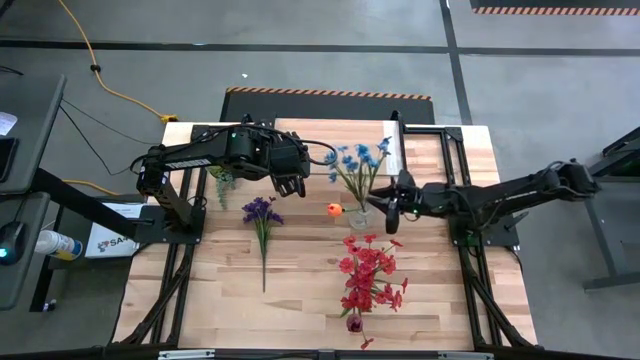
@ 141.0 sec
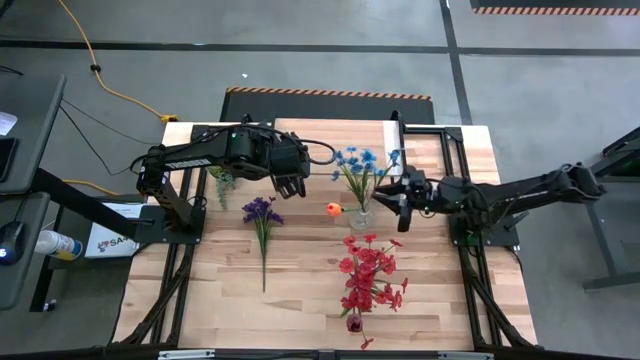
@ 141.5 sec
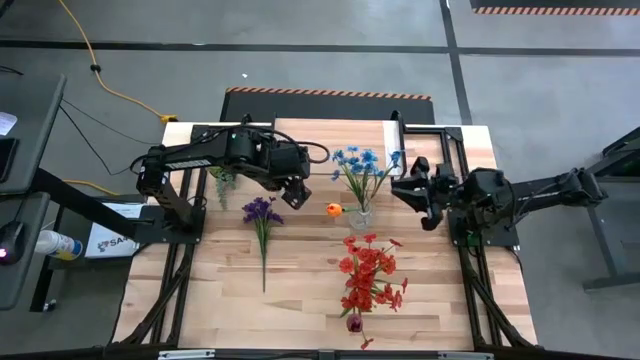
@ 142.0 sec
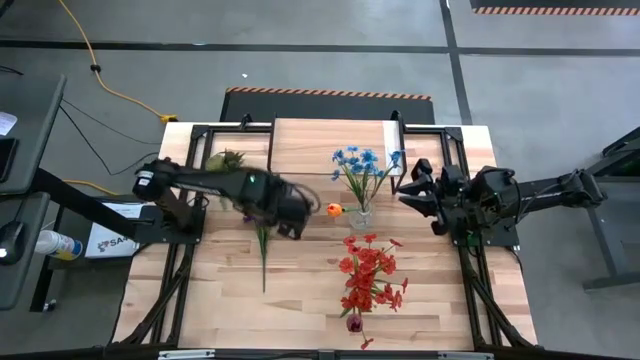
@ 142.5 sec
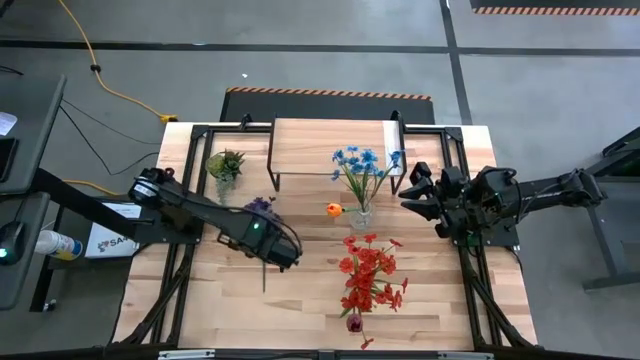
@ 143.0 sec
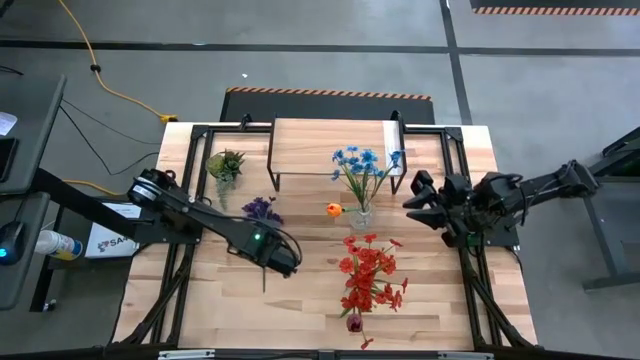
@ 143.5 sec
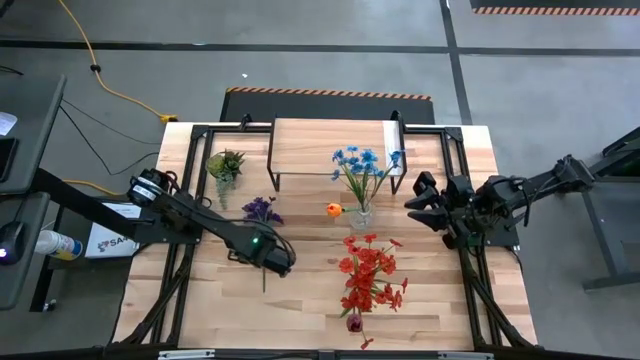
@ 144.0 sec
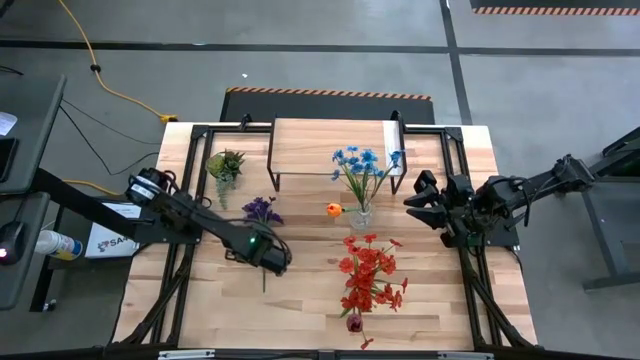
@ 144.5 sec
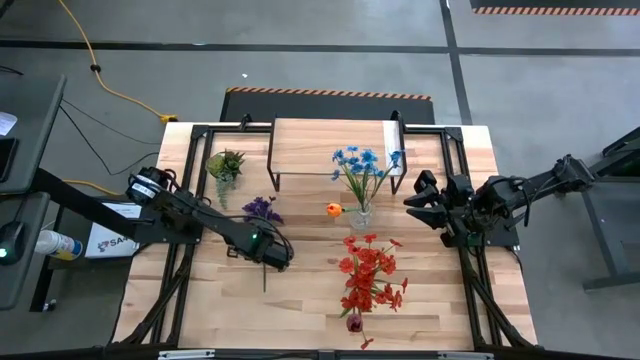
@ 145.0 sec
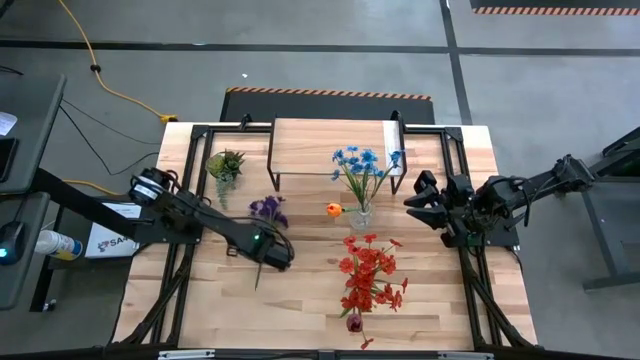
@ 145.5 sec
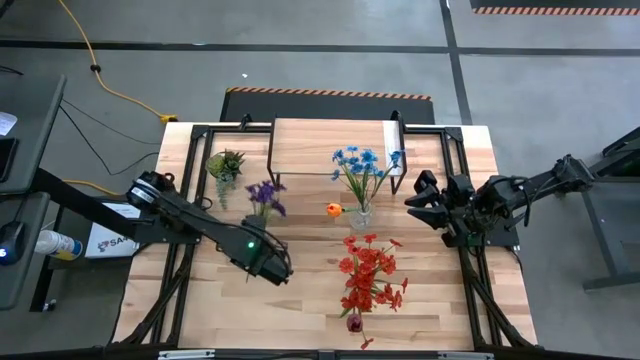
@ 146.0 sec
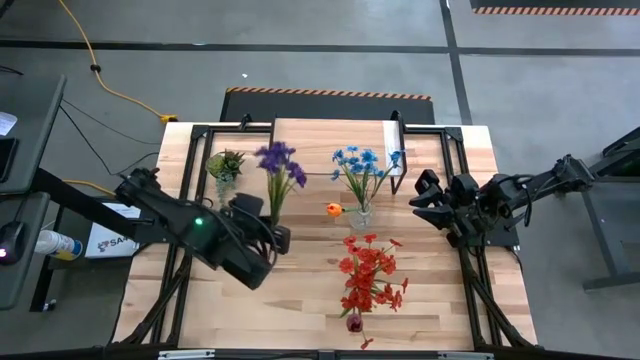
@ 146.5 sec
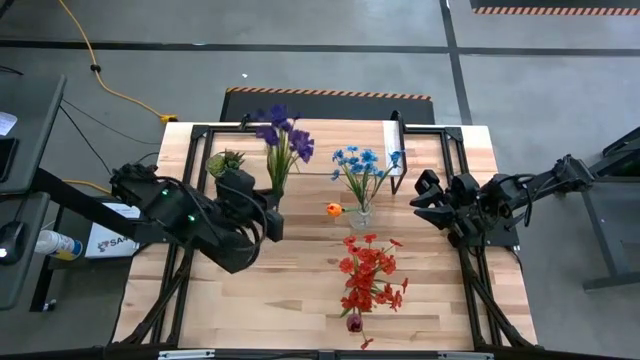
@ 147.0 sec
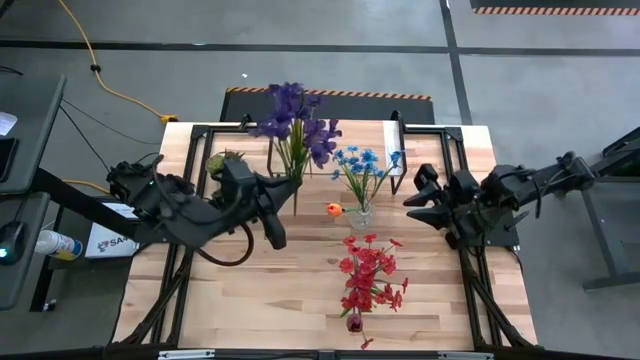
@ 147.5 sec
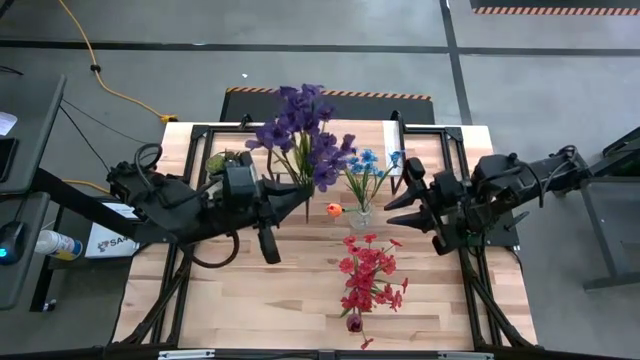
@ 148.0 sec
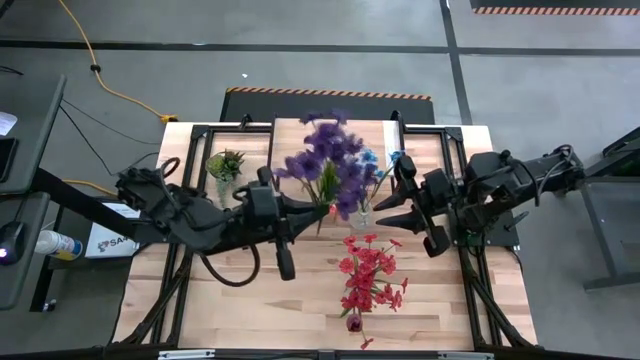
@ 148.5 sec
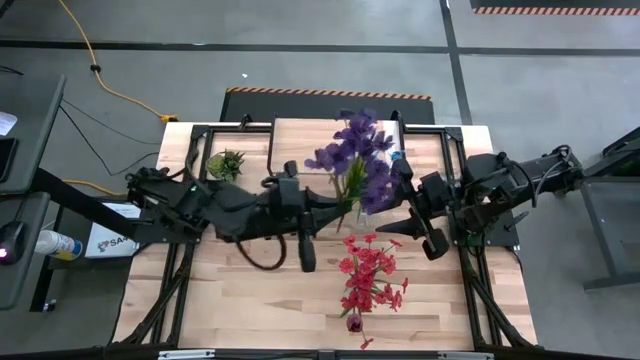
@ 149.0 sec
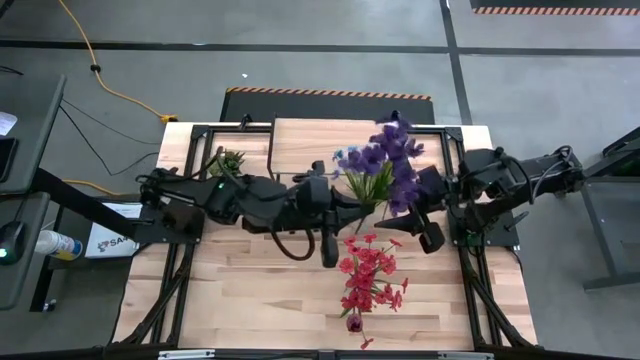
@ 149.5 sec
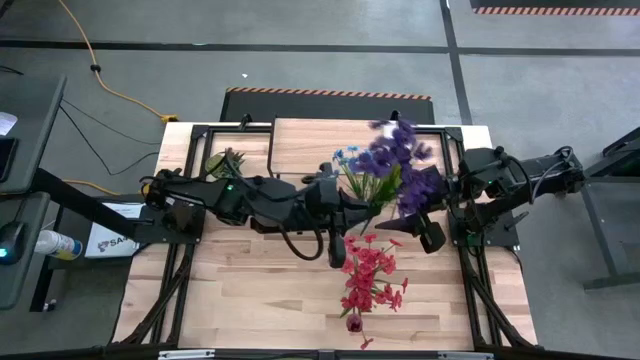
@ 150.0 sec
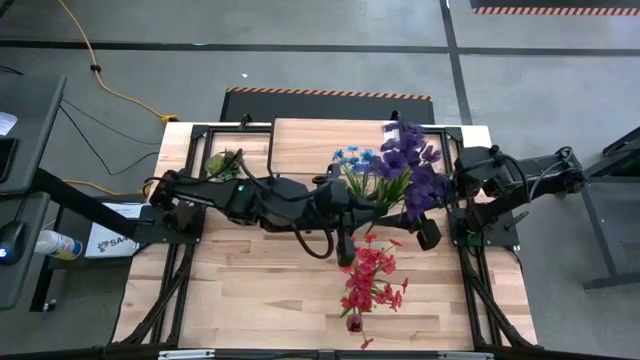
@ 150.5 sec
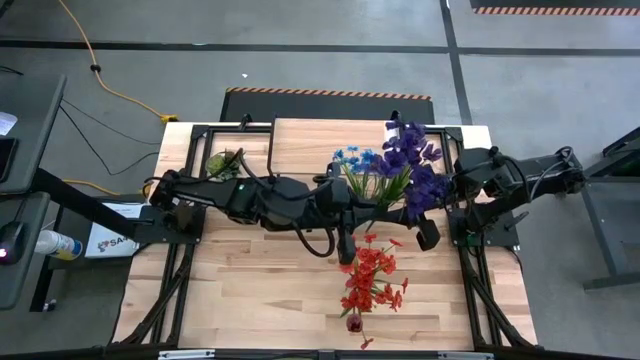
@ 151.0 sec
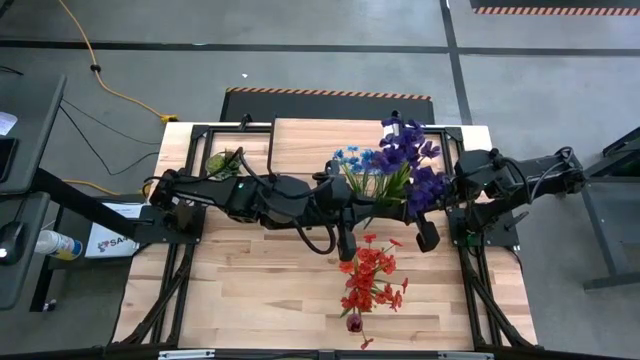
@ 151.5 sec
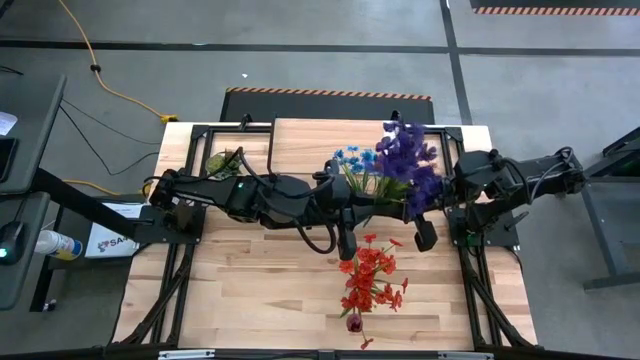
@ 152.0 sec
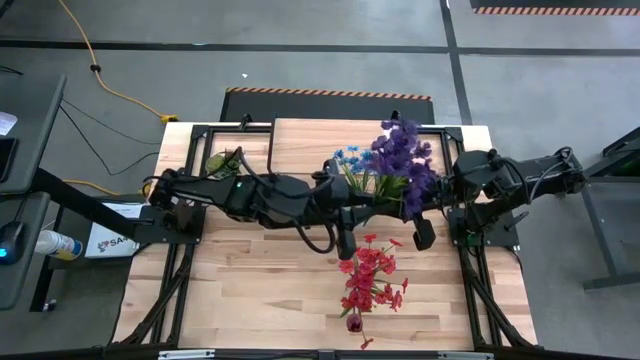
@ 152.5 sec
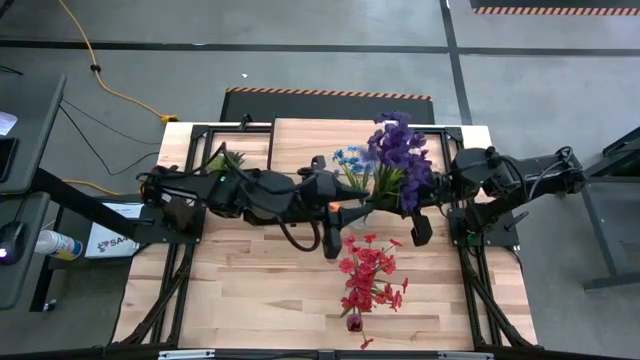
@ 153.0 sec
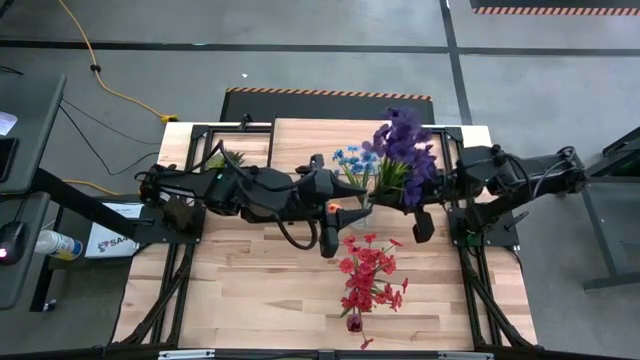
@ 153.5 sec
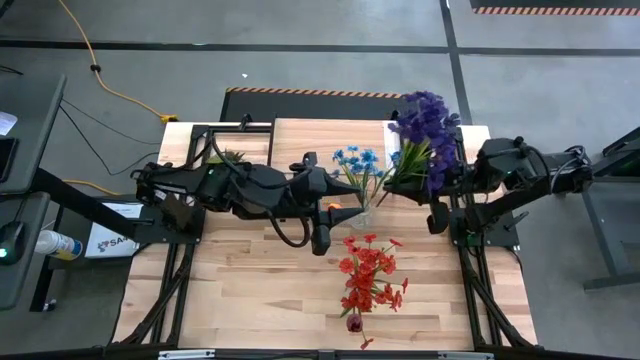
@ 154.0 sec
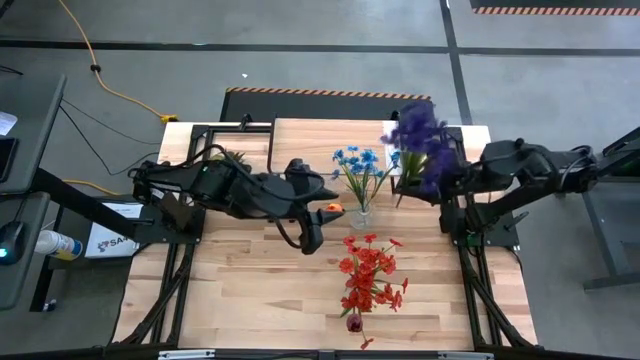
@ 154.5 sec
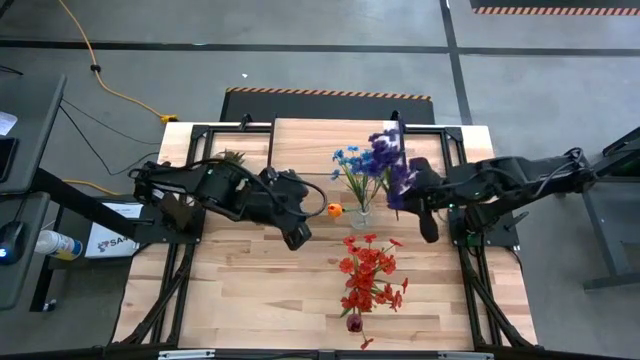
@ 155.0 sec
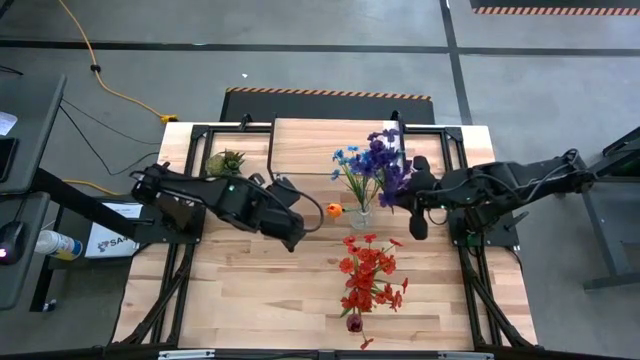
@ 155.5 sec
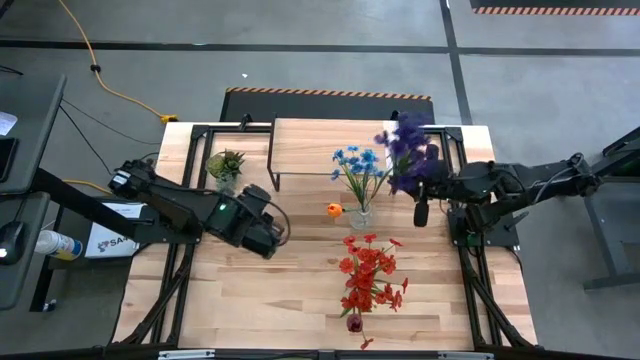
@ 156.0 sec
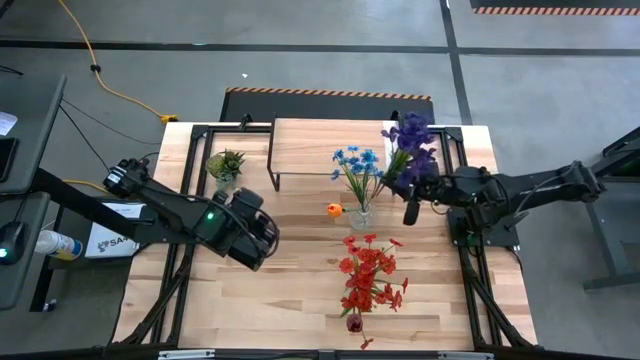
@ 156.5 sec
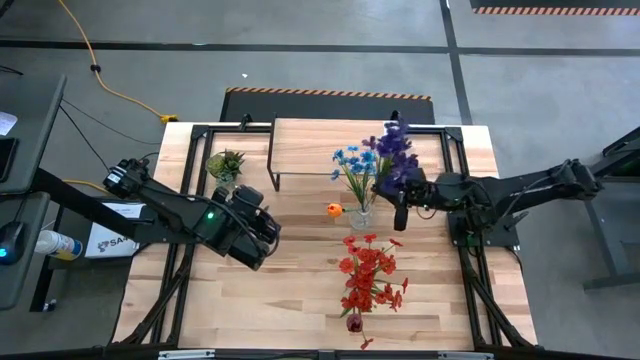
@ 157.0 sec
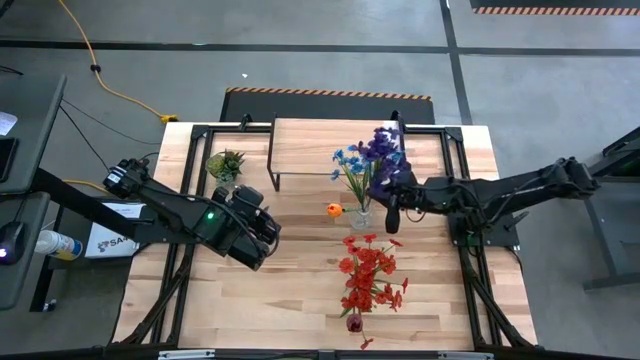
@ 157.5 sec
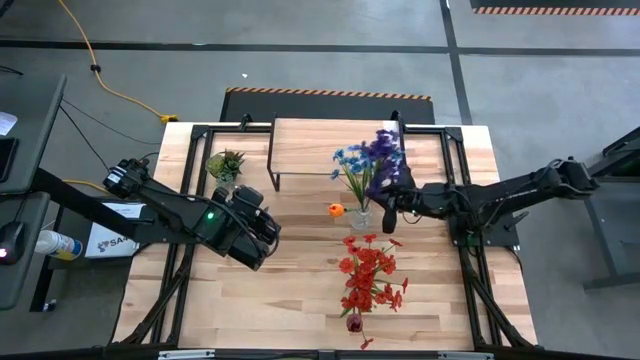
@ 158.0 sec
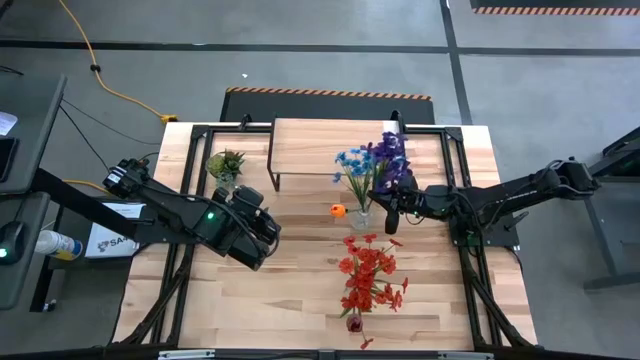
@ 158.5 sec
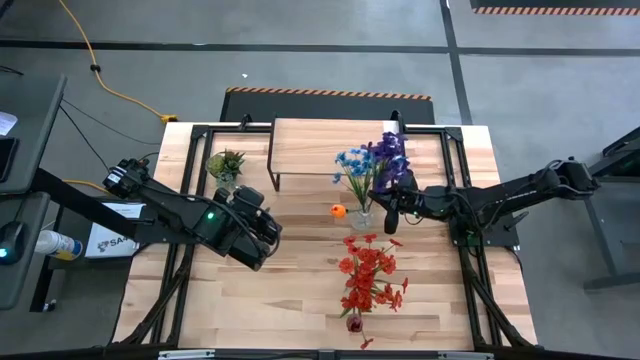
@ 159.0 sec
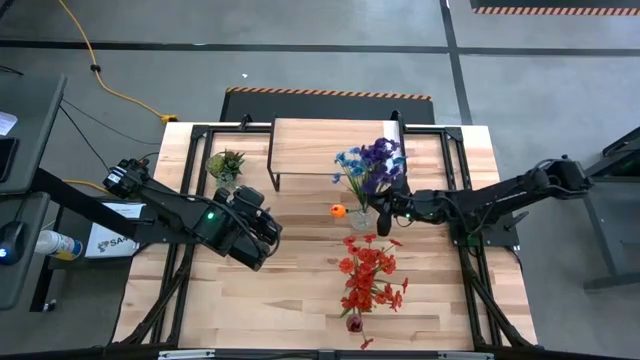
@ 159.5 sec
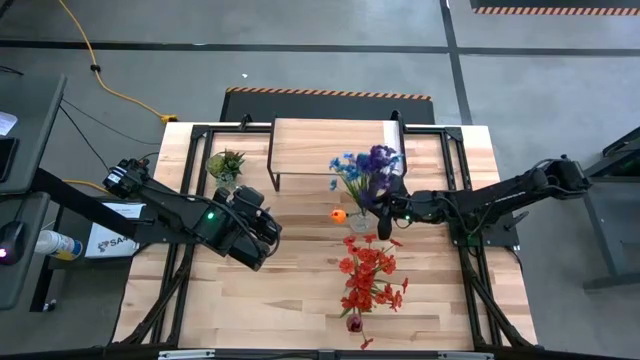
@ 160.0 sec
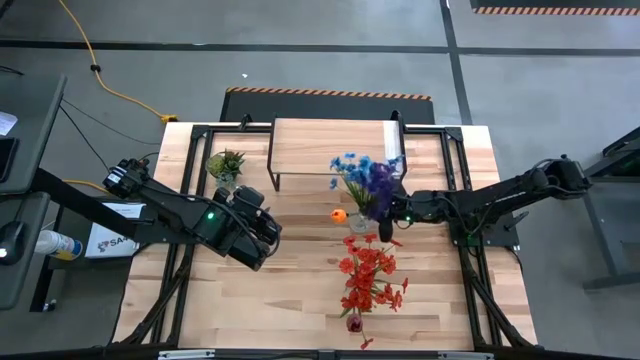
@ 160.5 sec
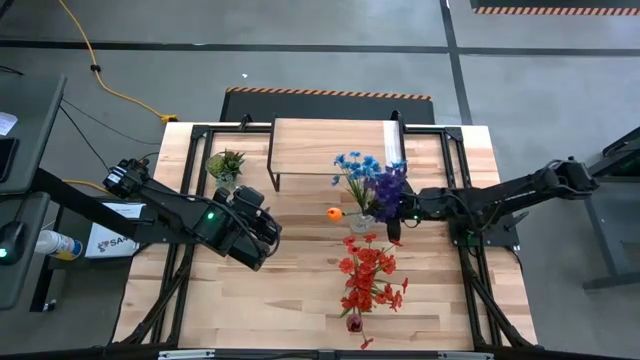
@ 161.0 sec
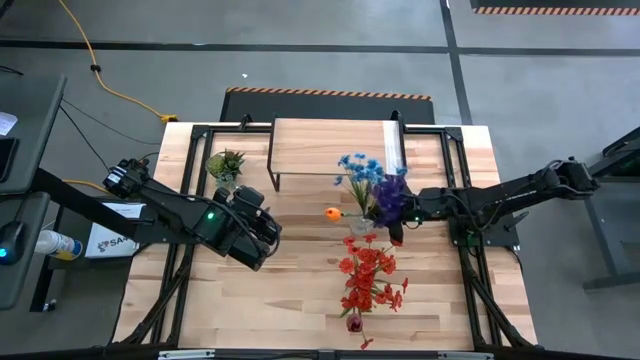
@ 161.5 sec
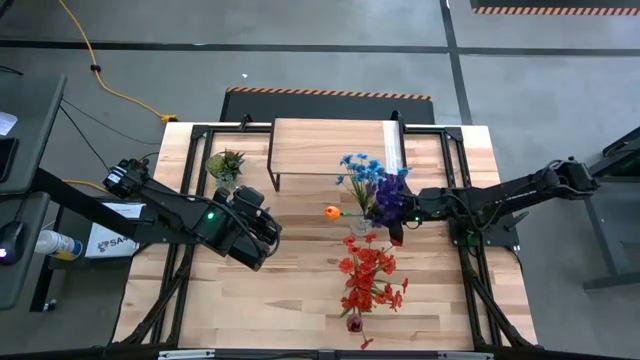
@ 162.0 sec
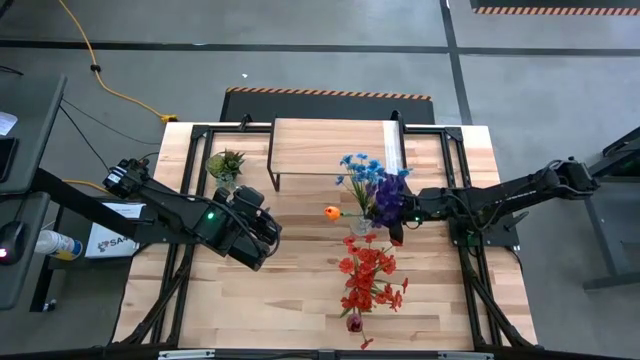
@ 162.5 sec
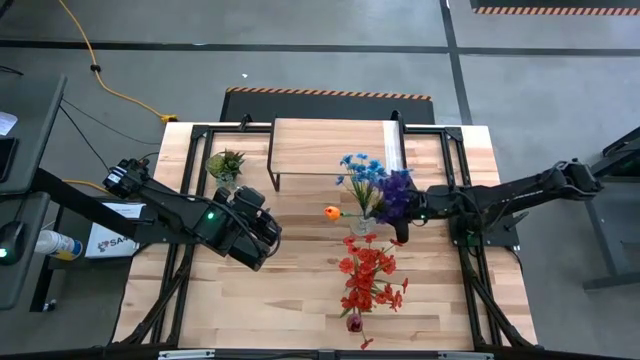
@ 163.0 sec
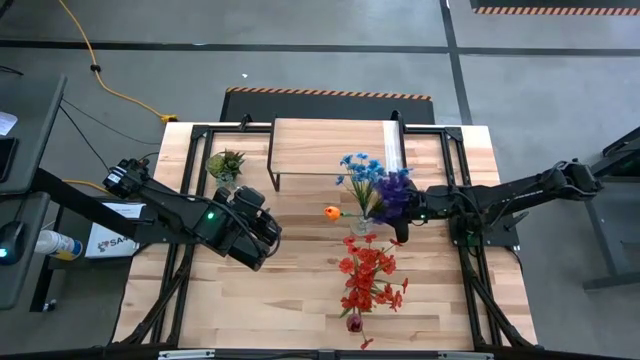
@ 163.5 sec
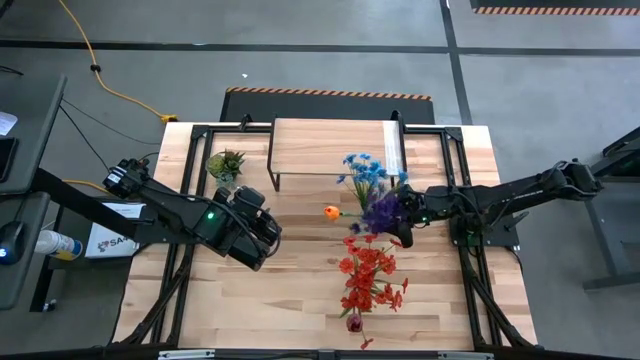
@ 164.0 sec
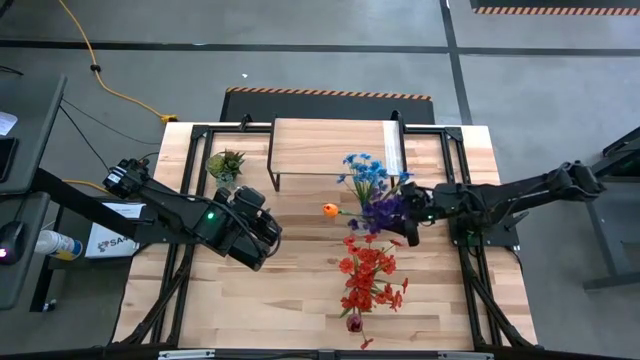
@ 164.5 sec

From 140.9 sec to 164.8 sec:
Task: Pick and place flowers into a vace then onto a shelf
Put the purple flowers into the top transparent vase
